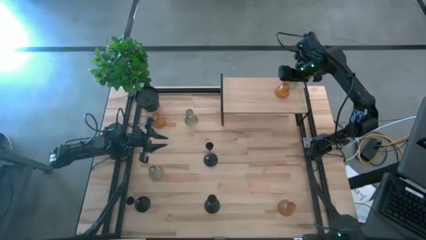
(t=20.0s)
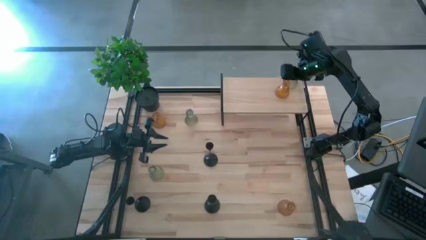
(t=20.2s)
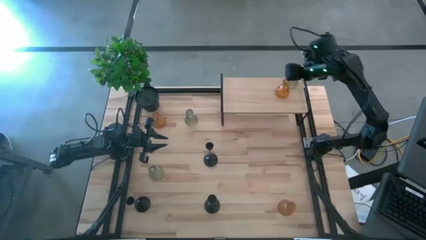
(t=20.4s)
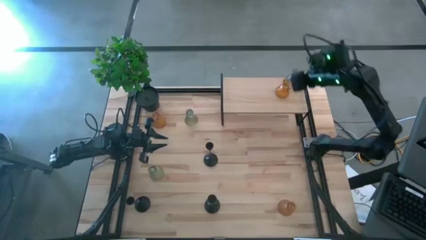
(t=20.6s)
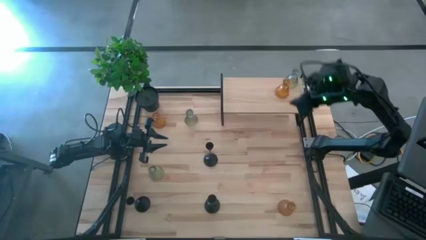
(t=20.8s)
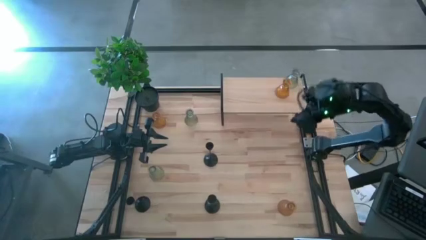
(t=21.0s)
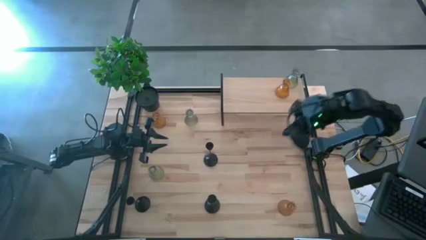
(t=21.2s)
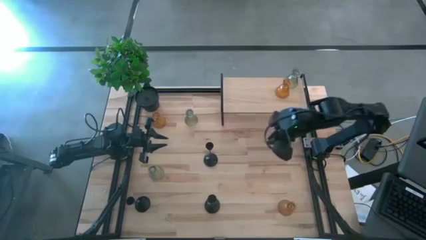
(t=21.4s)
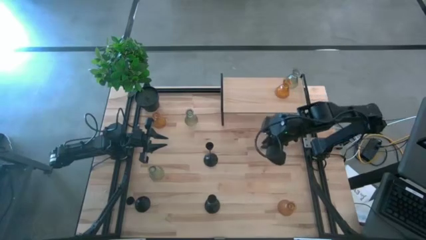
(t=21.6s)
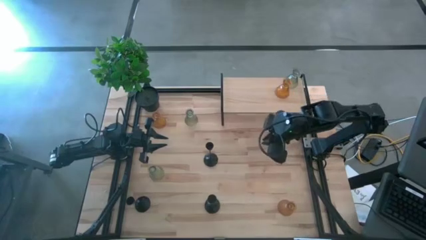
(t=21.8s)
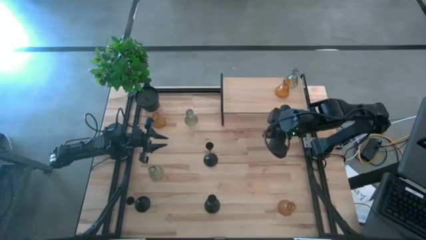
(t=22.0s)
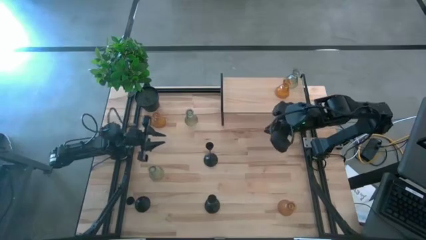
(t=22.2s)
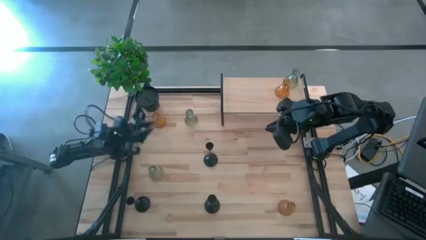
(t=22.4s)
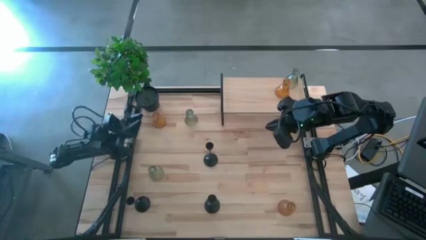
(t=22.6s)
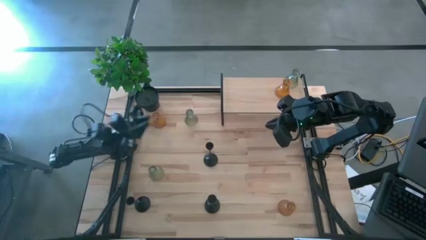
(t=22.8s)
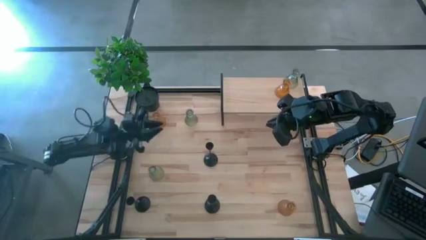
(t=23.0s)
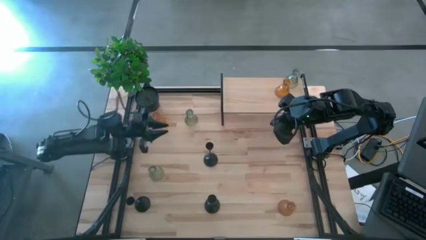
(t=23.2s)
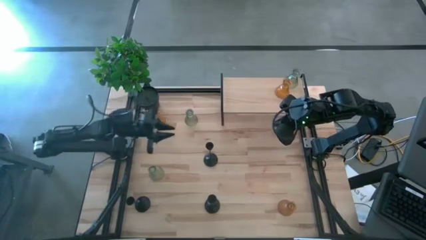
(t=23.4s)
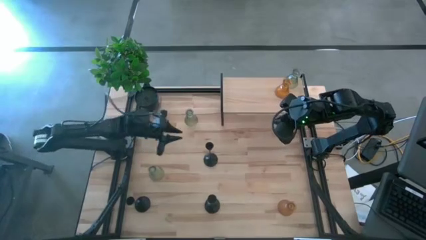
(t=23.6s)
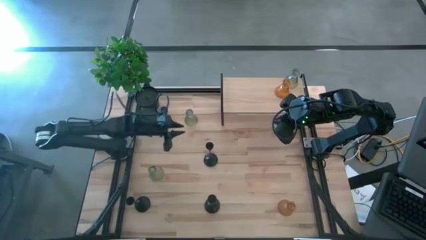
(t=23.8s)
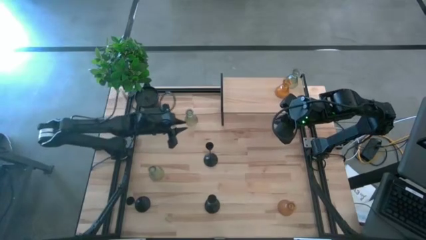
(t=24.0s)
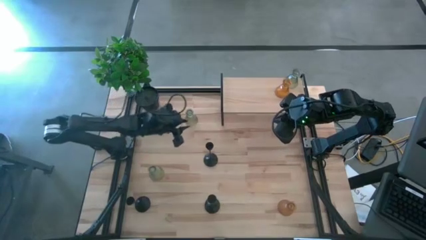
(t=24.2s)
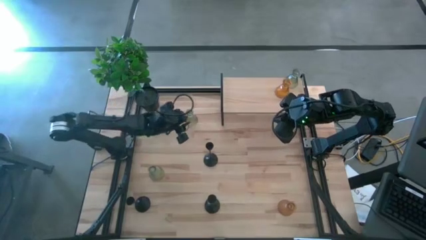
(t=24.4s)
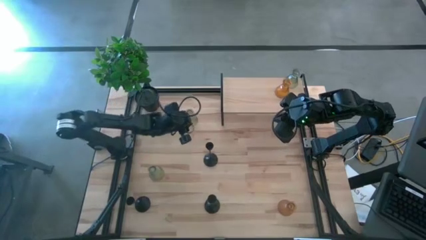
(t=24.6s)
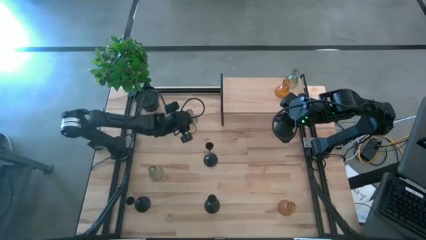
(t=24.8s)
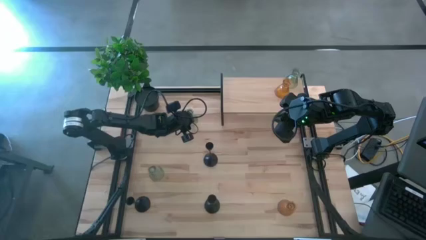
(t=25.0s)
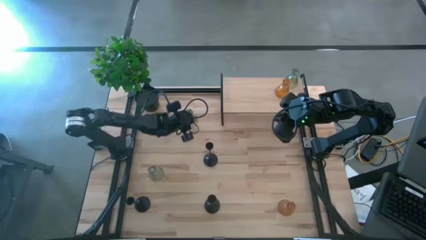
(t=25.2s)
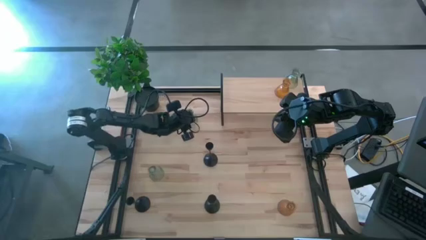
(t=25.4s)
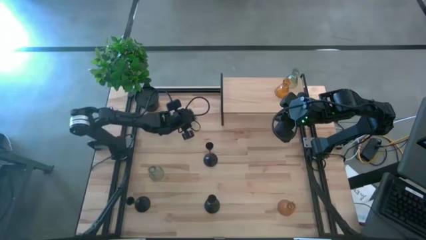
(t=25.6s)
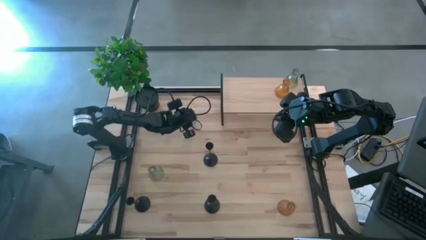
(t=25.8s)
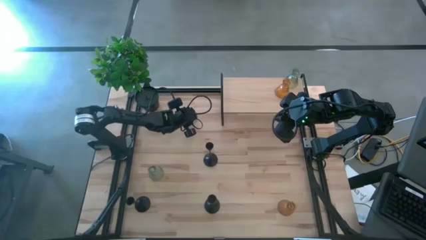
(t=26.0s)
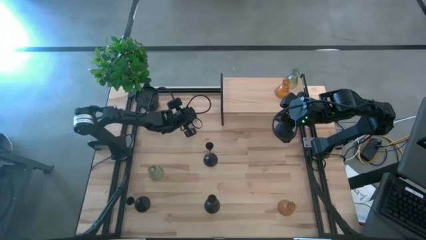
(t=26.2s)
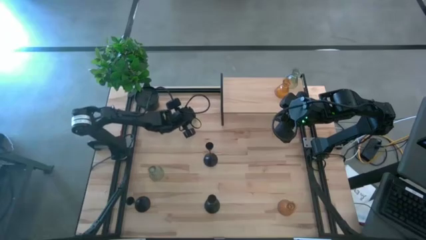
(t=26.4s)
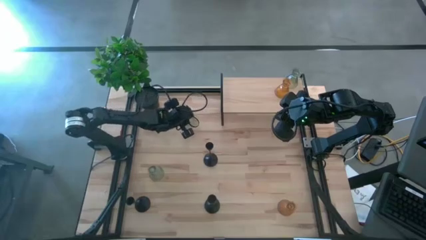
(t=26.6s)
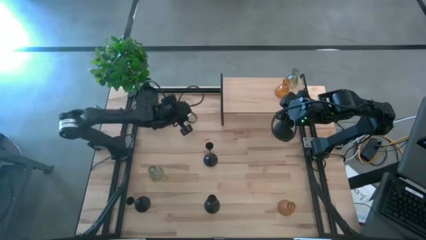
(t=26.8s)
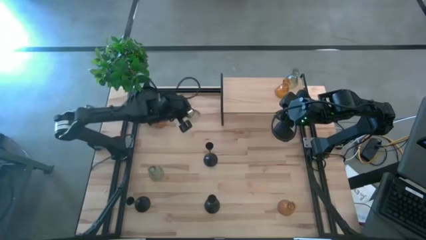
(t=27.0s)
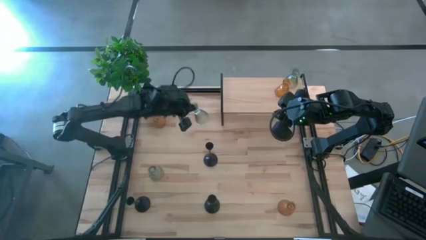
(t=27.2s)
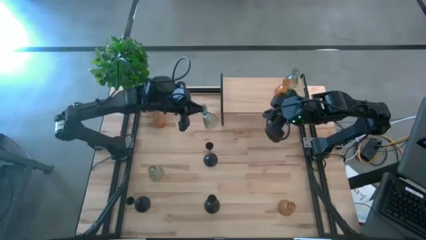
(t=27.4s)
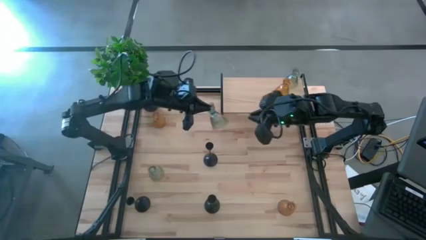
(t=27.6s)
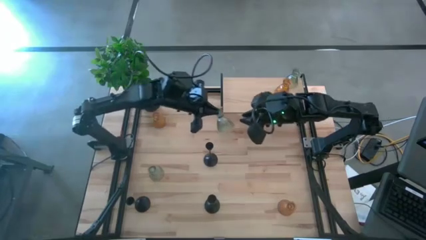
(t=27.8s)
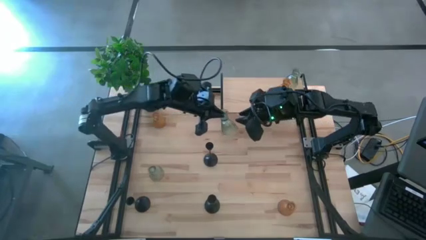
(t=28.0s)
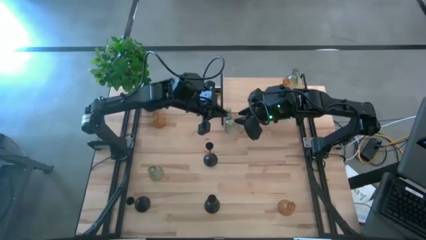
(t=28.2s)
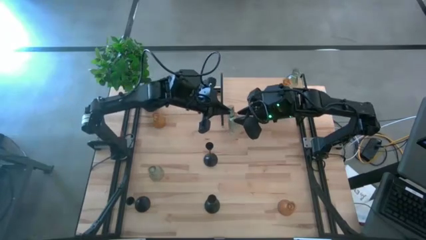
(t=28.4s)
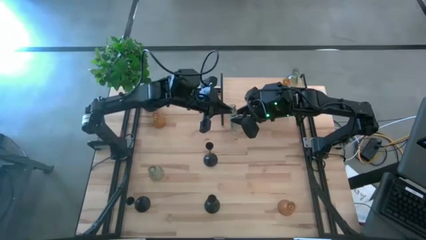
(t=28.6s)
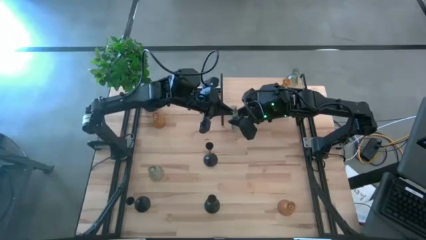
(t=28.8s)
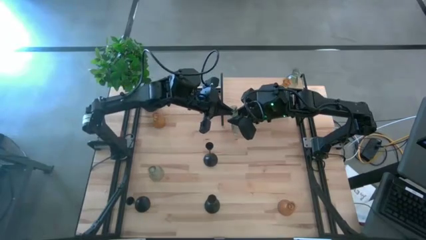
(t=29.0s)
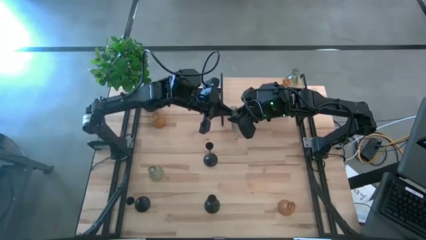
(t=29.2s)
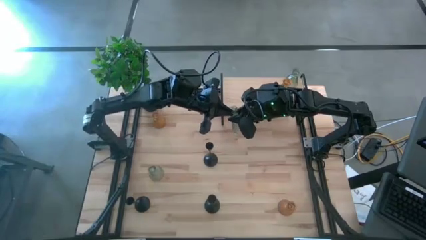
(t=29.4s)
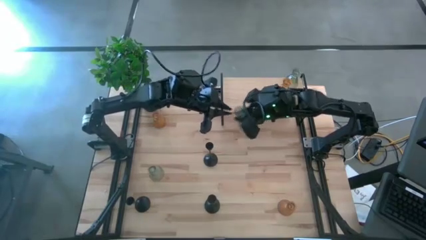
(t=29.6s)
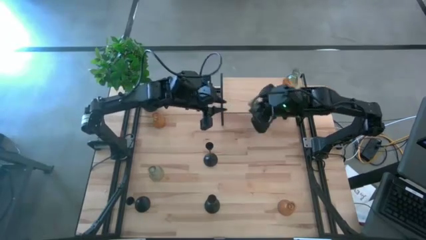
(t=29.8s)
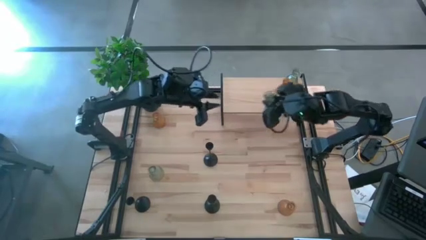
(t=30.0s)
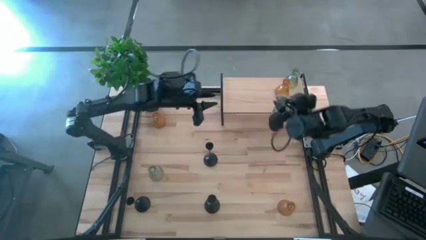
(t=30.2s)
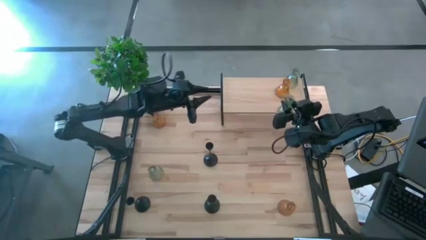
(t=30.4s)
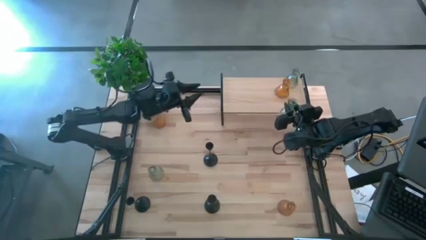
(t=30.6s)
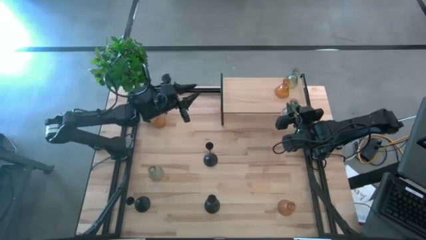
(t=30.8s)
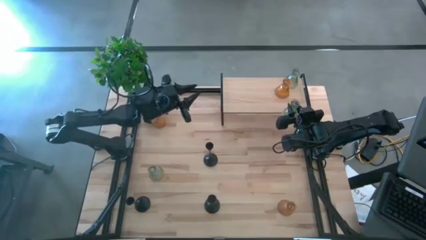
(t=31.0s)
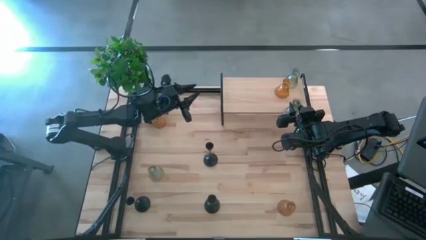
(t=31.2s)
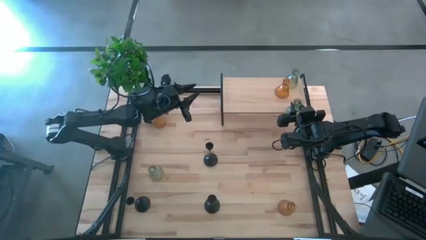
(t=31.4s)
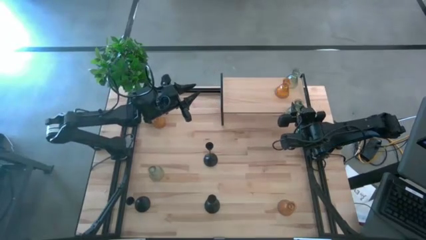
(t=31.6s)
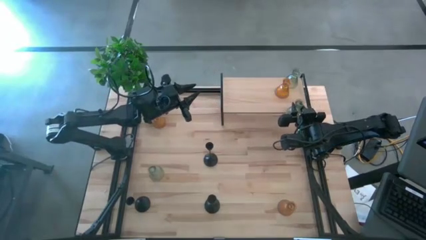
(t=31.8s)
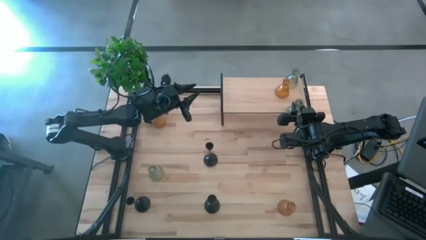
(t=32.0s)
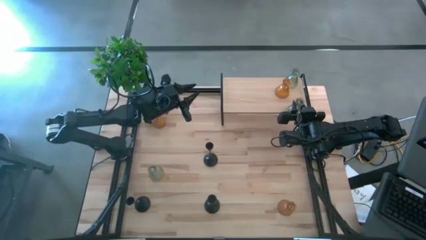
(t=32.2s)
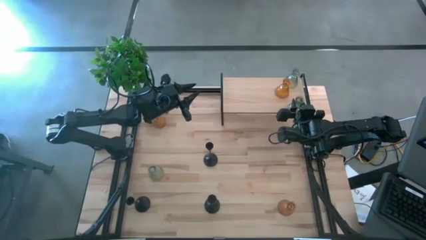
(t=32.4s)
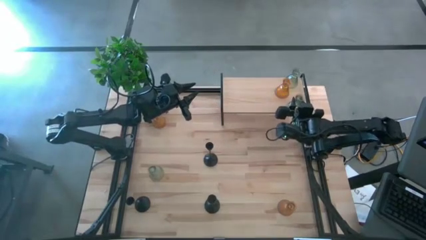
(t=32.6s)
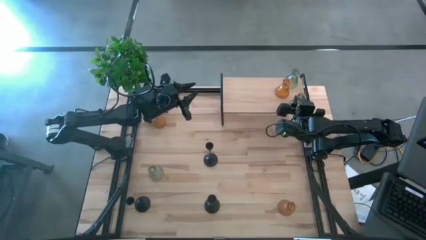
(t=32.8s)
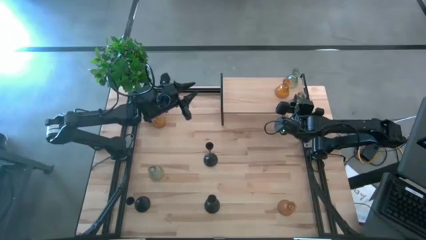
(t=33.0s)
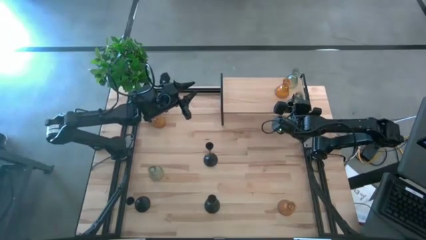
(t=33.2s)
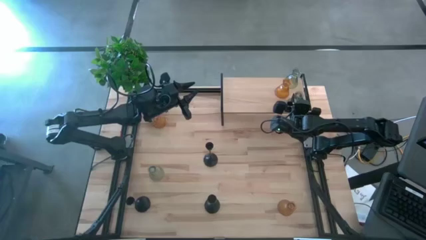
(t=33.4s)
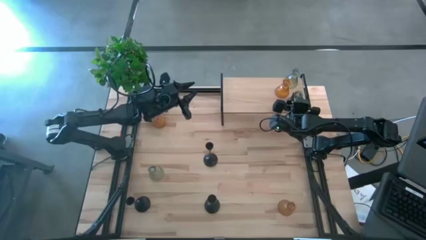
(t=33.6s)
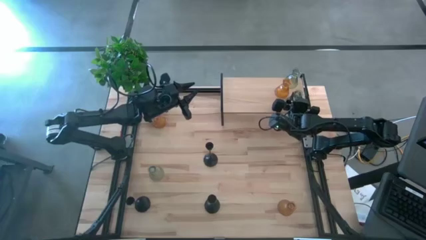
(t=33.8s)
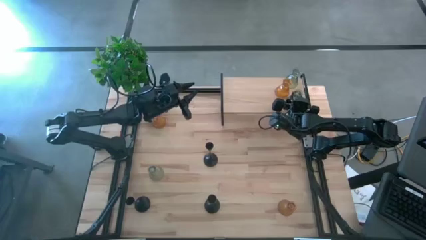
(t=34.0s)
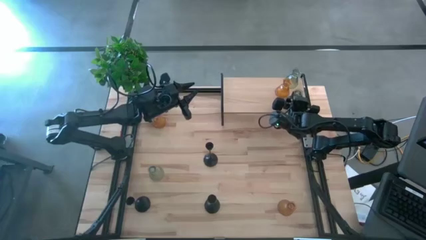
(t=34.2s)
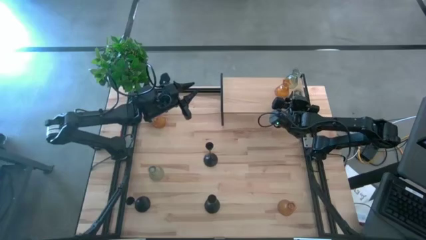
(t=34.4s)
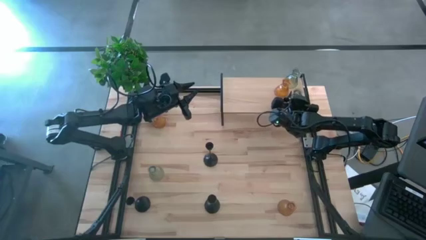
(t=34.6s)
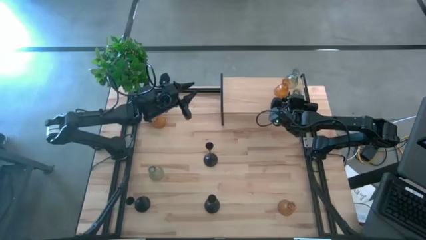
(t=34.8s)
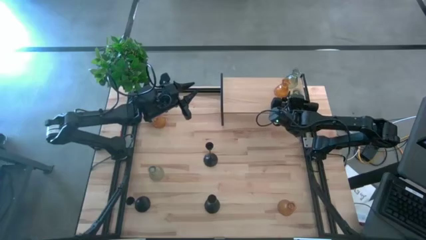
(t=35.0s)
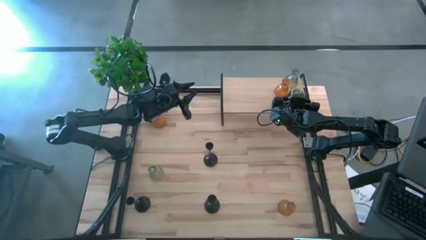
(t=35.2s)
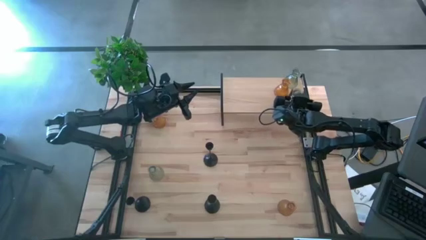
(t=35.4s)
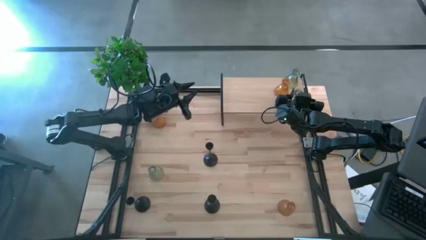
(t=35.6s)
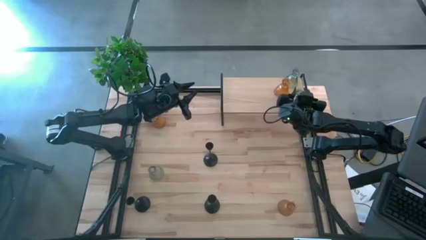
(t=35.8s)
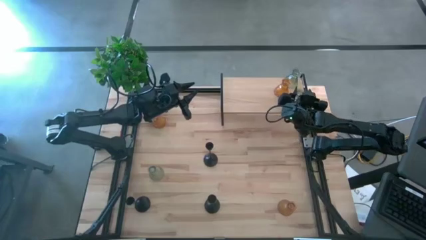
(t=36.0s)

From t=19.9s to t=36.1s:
Task: Pick & Place candle stick holders
Put the top green glass candle holder on the shelf
